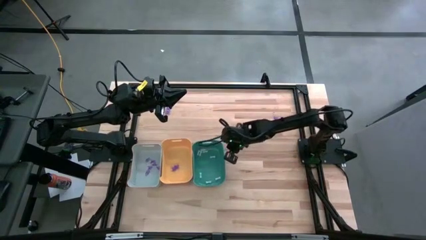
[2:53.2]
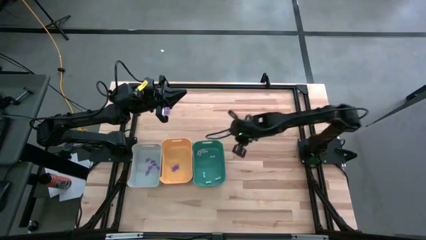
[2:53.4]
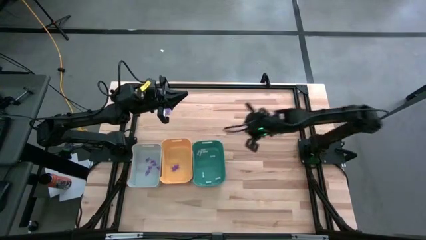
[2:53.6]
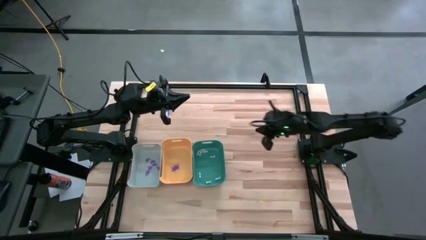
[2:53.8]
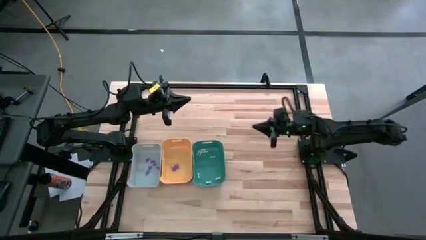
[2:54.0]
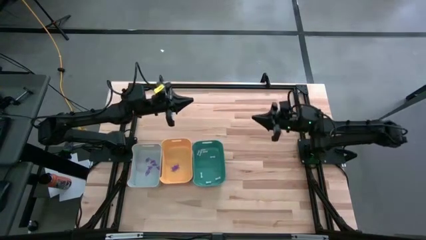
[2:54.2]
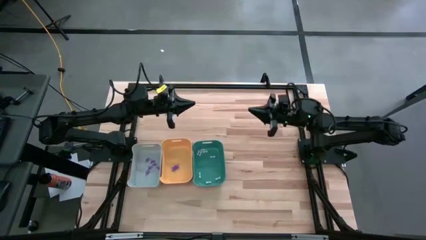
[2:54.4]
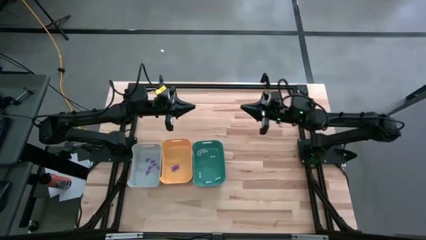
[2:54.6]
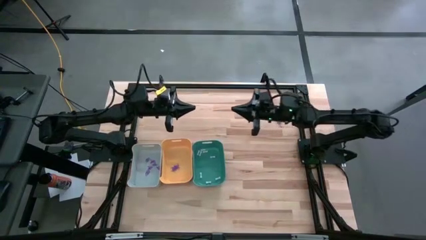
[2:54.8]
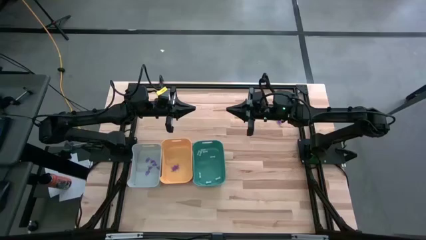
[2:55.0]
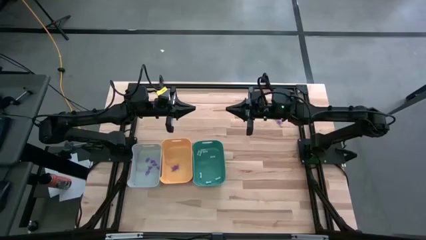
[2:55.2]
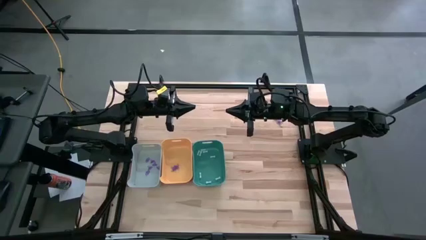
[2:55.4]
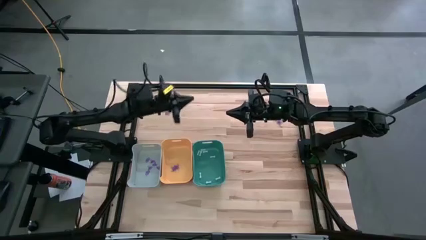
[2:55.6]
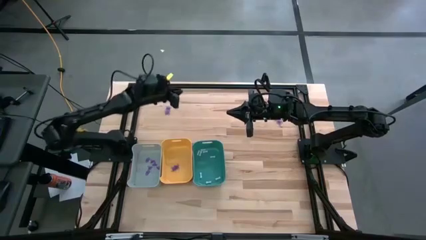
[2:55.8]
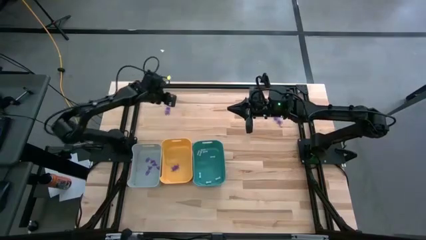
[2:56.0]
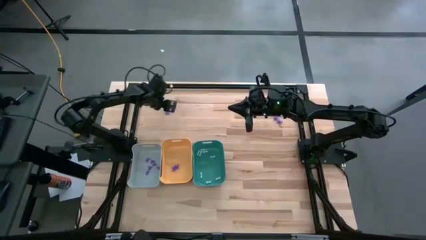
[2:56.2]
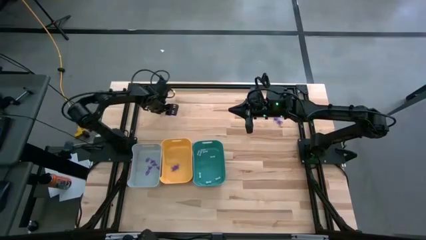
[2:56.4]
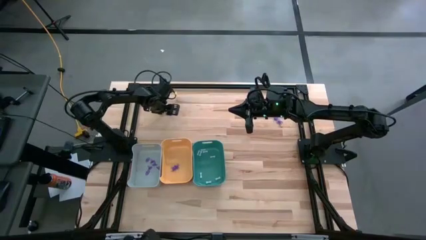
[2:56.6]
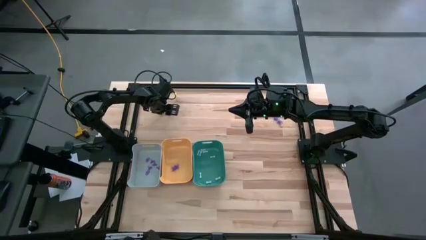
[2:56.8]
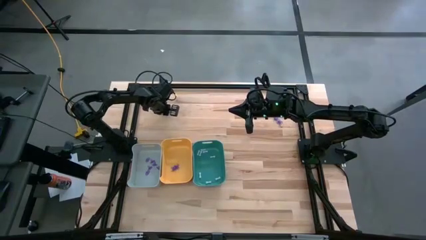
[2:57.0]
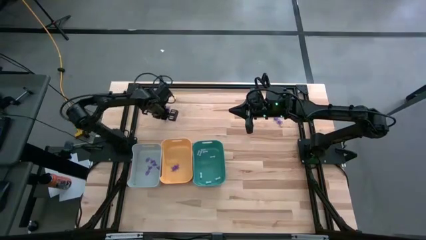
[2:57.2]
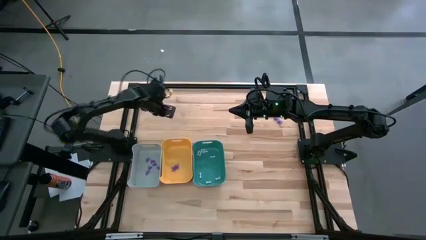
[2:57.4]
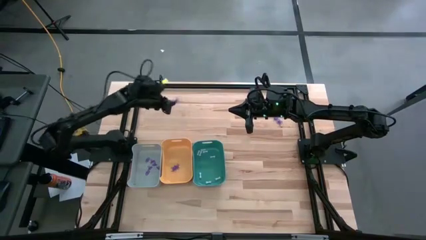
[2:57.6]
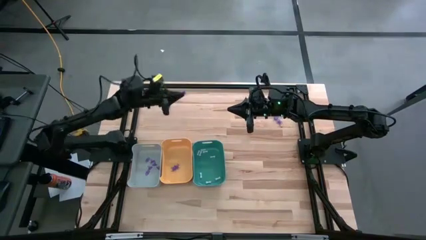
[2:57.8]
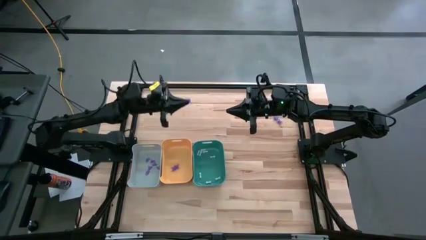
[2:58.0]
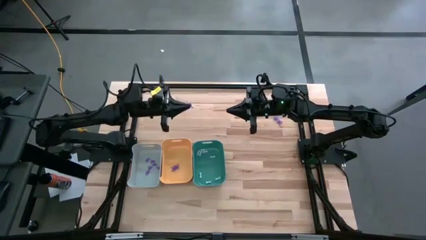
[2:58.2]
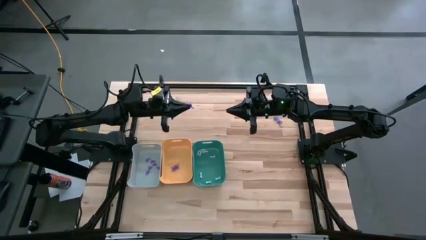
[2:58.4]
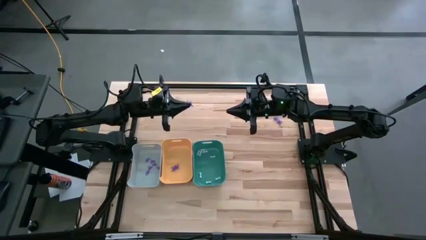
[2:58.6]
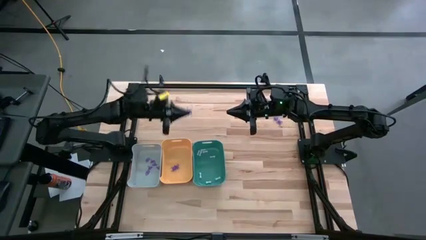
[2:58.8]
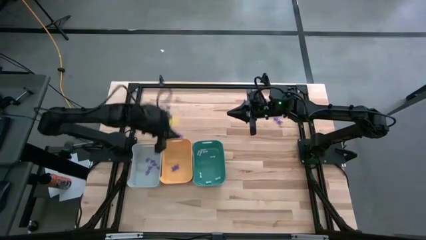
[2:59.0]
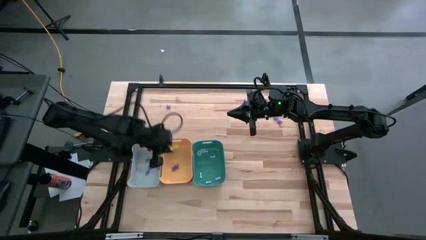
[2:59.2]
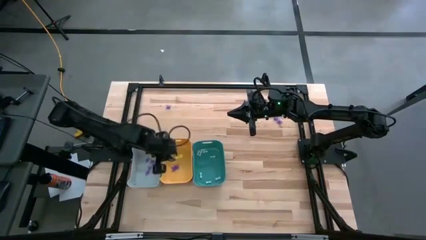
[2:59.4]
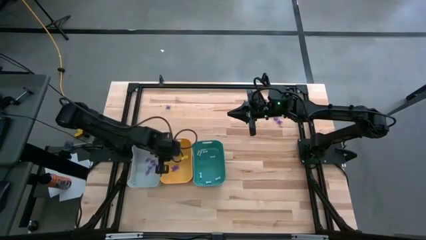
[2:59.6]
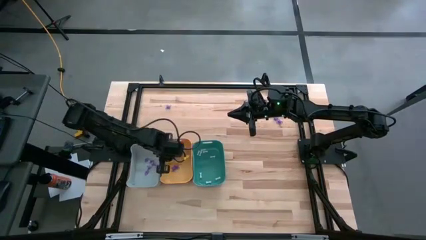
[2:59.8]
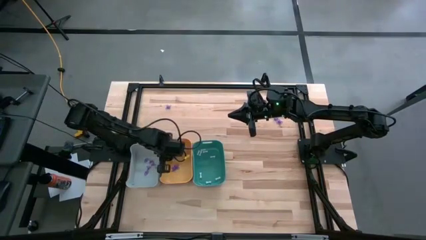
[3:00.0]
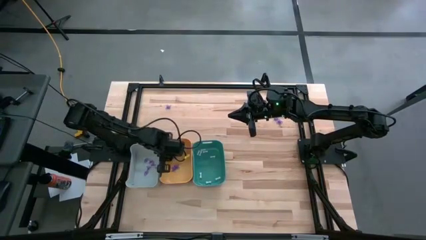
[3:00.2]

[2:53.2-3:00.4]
Task: Sort Halloween decoration
Put the purple spider toy into the yellow bin

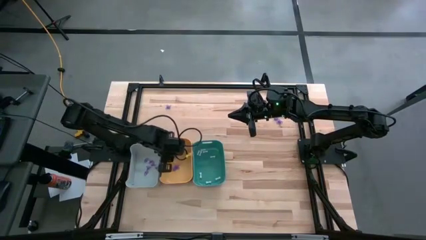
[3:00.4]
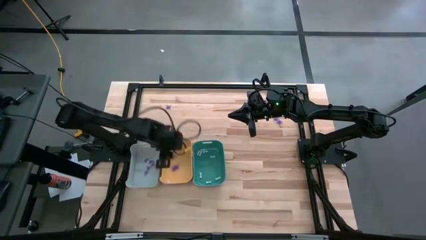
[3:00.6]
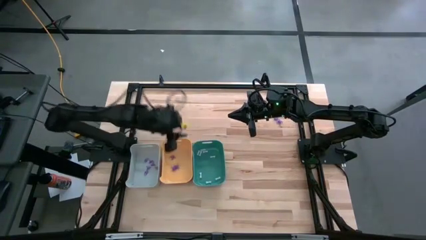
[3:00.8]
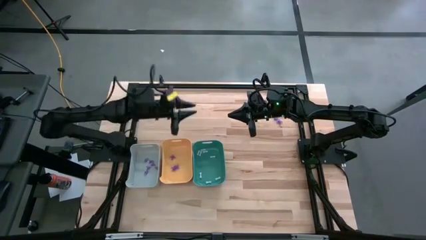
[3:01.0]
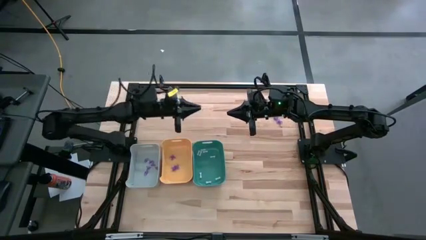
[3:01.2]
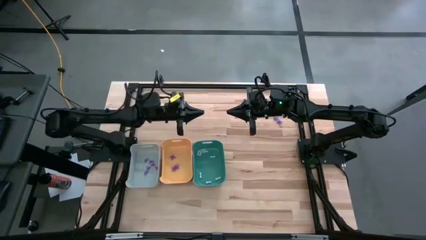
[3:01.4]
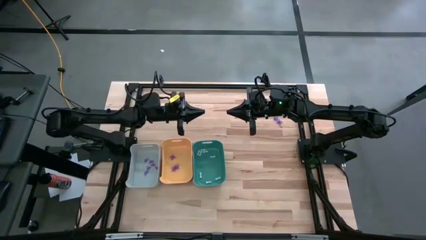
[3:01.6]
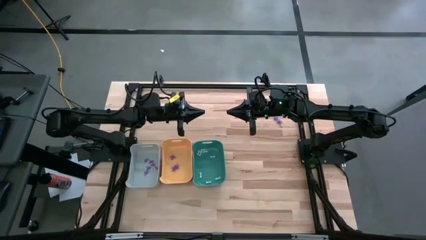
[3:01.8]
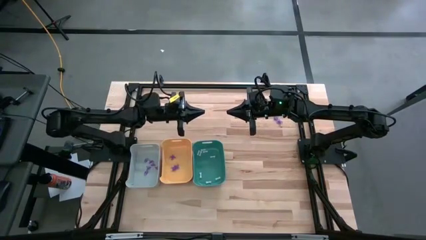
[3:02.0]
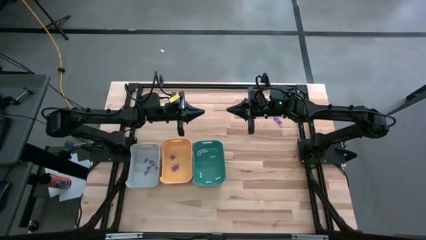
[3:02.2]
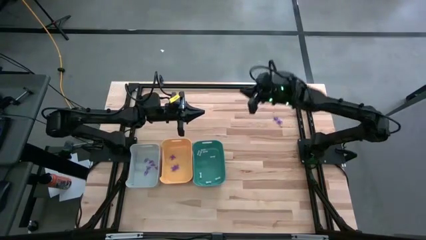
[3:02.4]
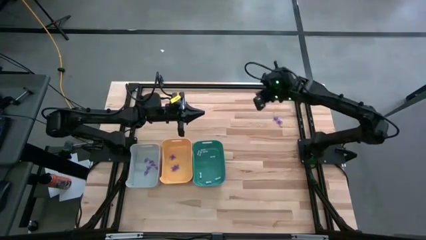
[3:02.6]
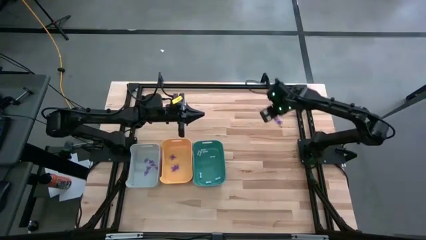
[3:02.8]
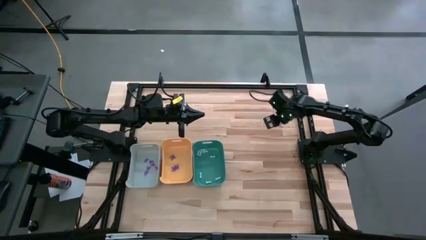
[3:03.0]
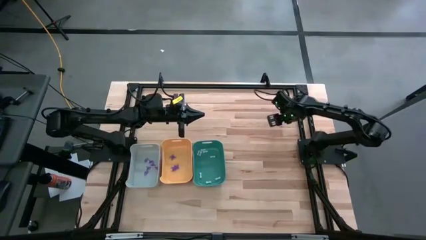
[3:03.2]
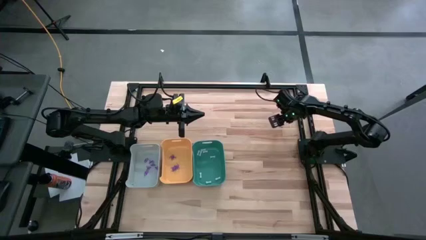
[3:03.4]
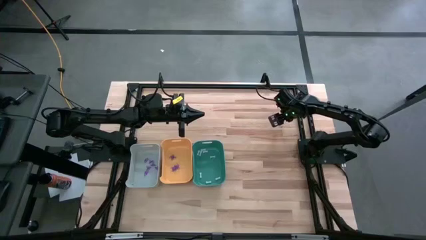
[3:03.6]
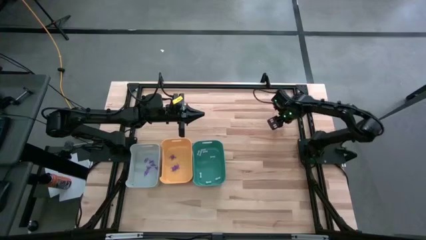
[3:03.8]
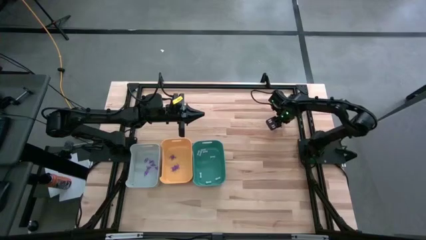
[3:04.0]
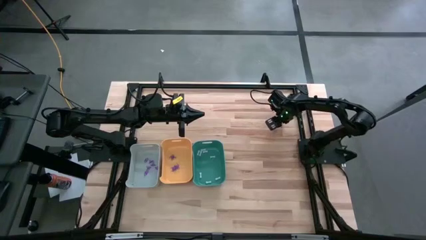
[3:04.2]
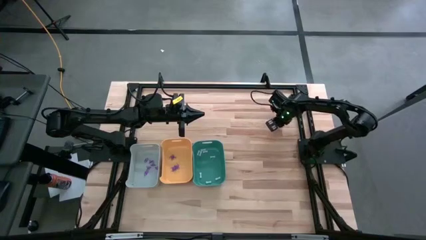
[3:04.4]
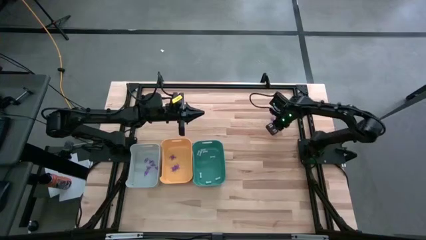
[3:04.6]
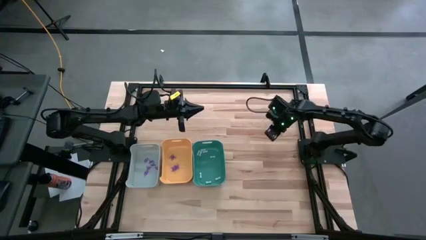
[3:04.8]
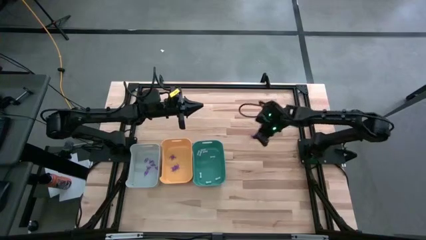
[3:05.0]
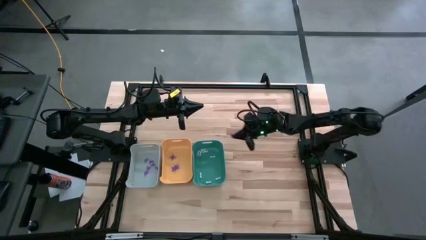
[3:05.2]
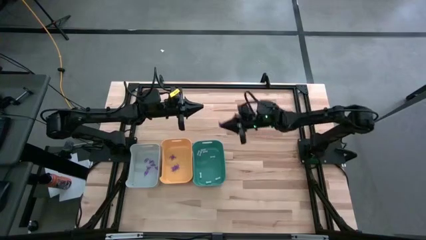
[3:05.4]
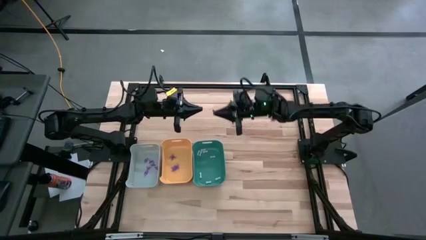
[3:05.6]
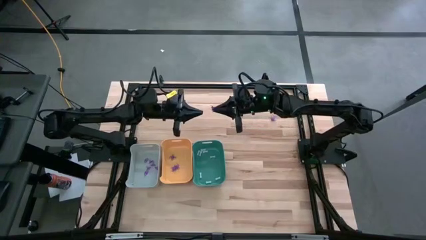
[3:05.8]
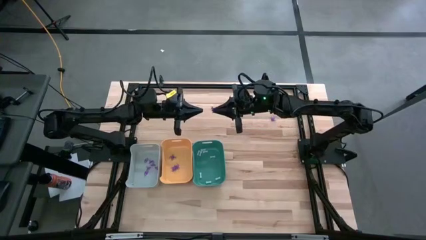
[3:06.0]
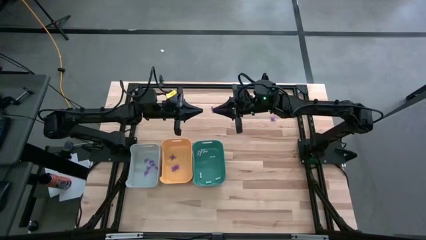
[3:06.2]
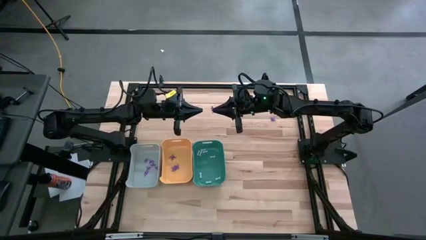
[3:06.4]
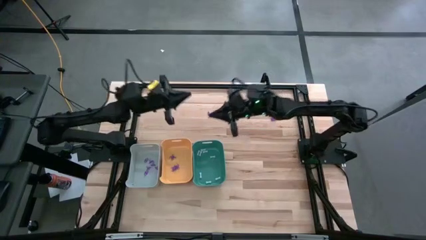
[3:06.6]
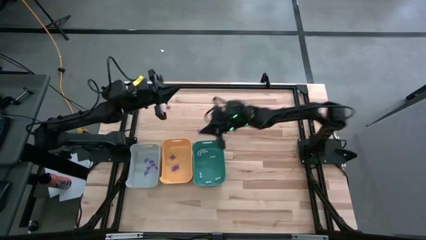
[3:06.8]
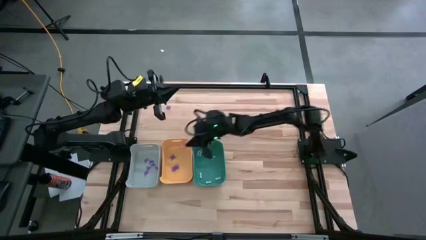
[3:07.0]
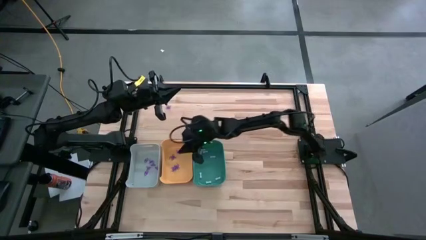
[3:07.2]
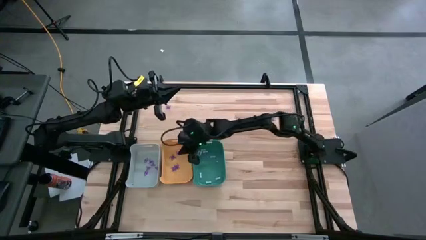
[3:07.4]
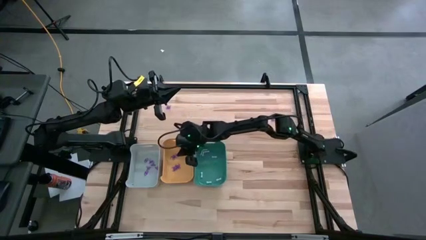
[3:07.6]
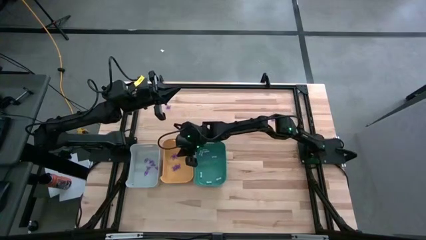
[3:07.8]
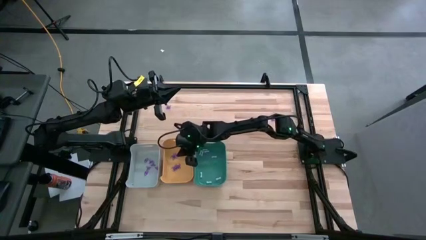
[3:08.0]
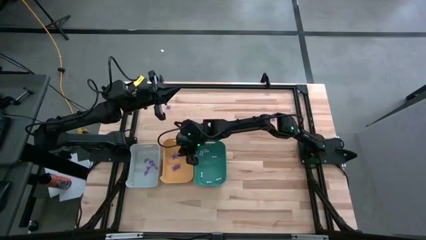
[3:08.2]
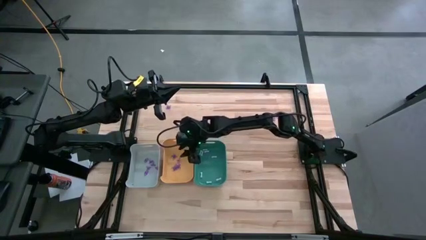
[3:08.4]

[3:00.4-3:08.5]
Put the purple spider toy into the yellow bin

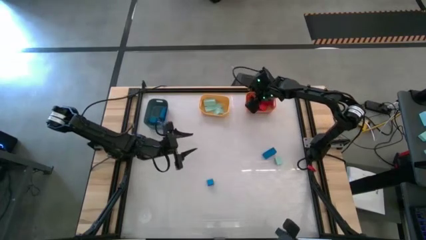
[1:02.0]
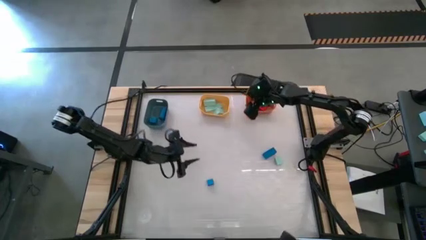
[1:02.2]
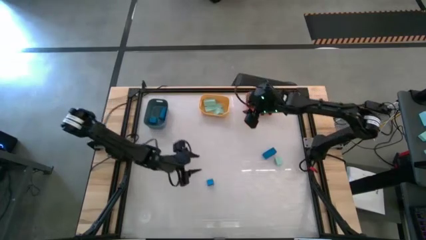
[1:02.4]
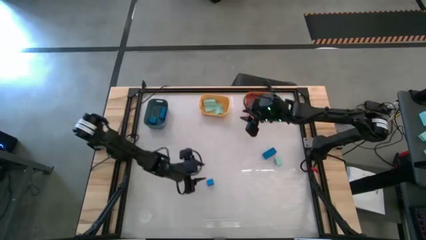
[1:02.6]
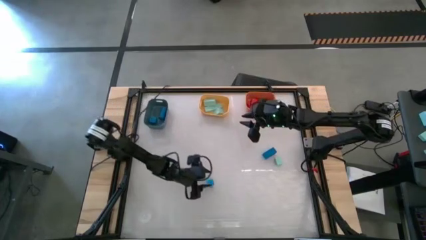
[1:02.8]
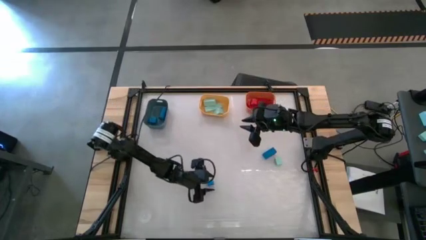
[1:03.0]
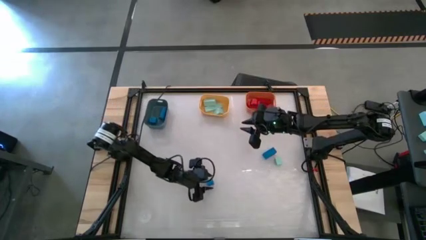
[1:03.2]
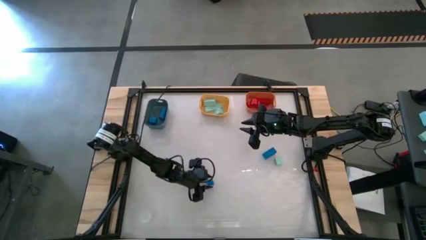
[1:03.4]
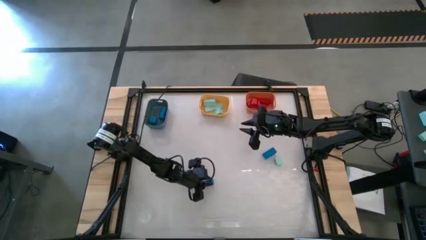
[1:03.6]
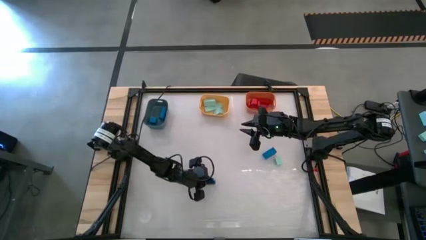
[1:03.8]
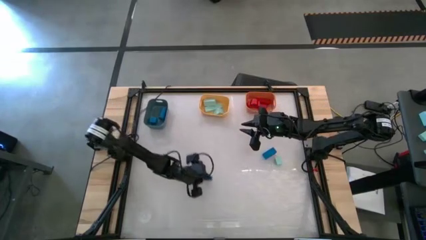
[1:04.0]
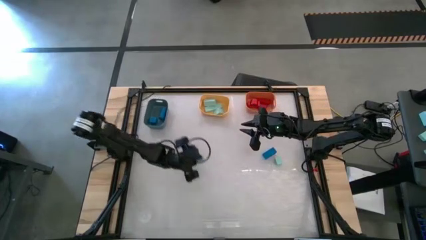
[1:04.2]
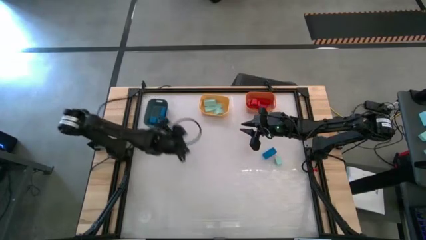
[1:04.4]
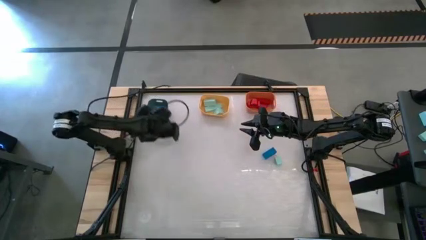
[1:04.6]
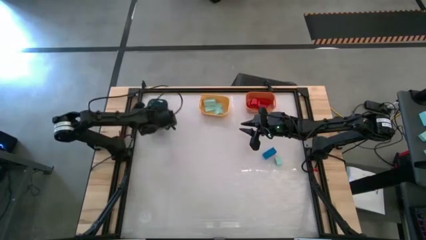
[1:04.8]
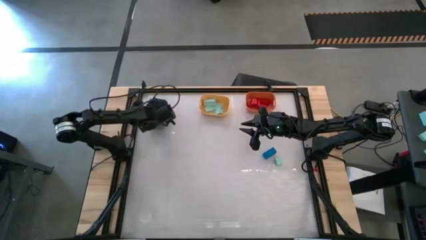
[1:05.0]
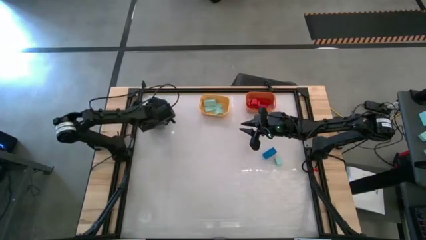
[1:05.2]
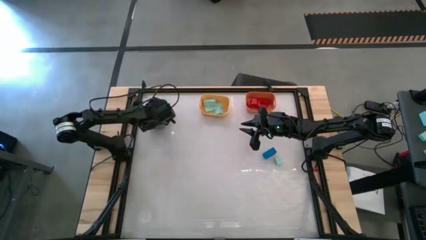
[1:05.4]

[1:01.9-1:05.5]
Task: Sort & place blocks by color
Put the blue triangular block into the dark blue bin
